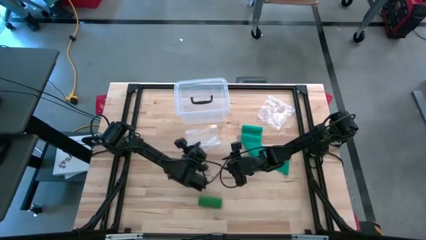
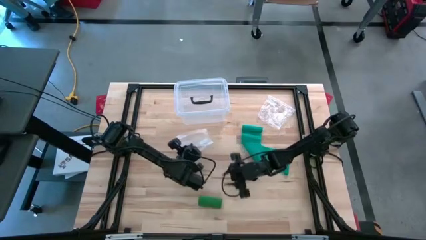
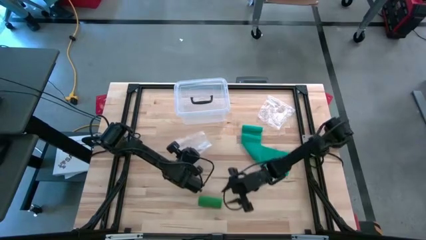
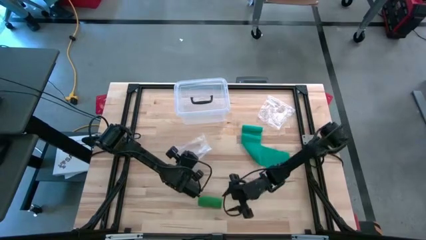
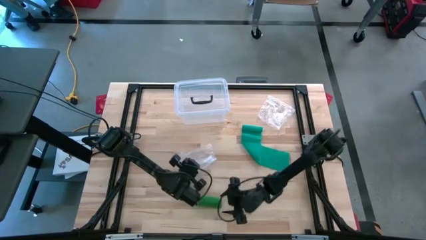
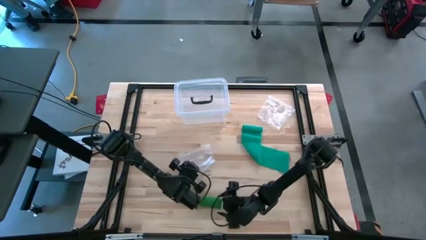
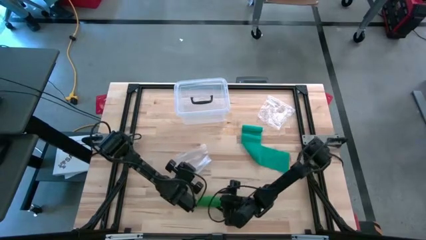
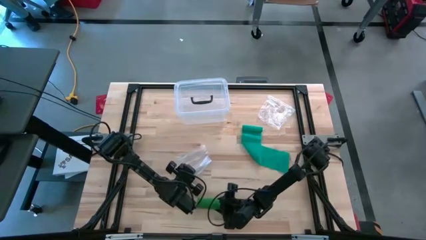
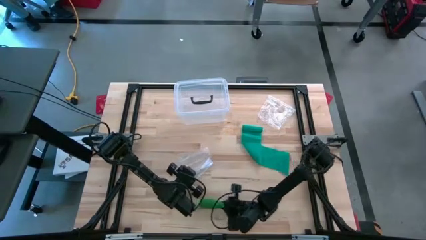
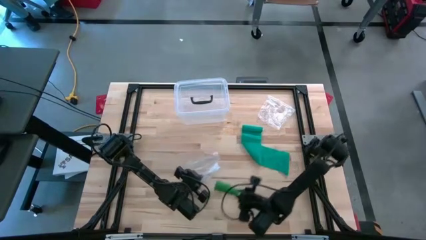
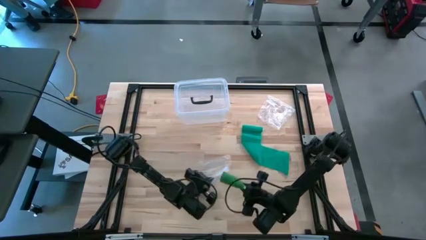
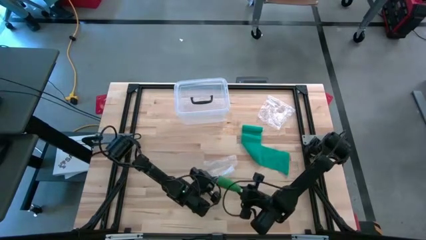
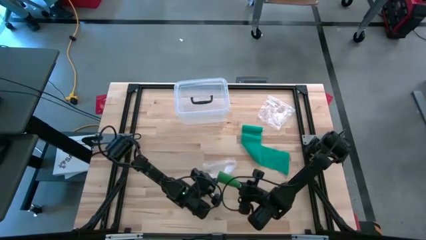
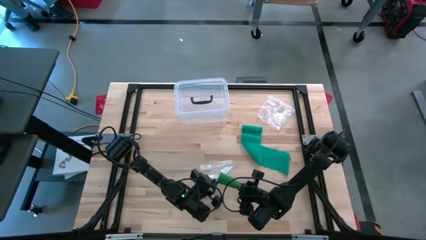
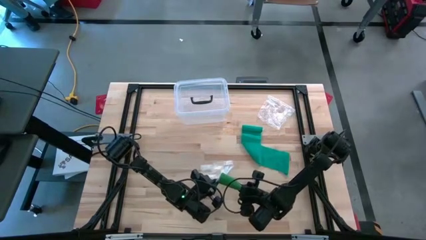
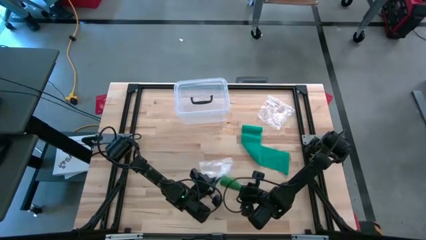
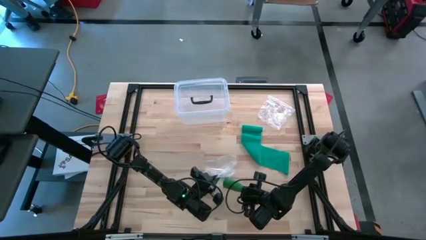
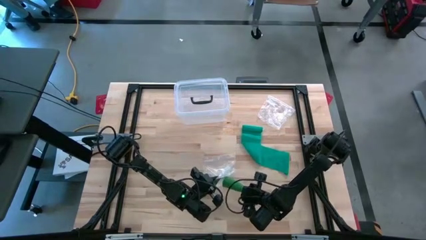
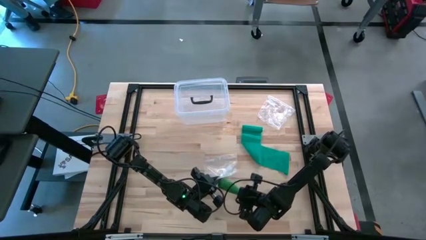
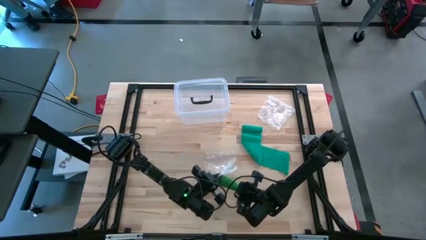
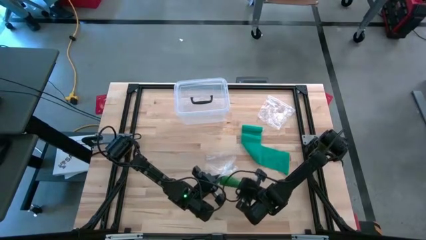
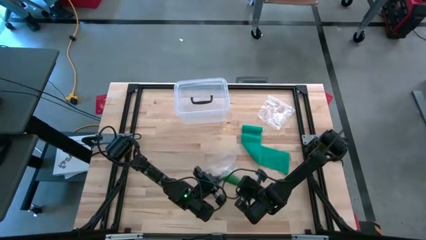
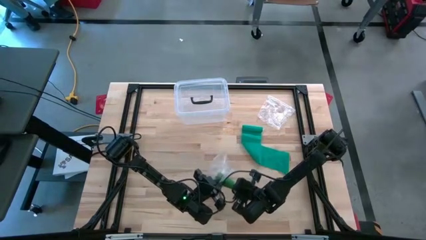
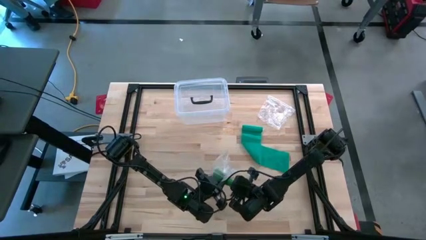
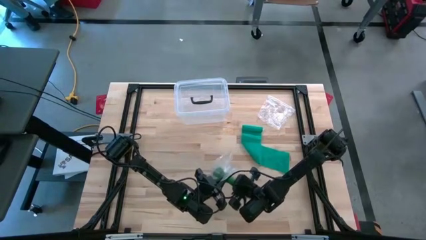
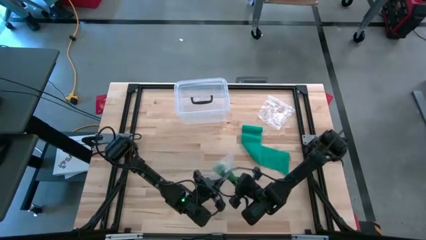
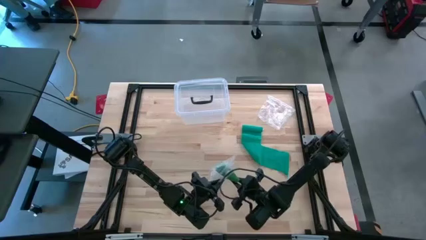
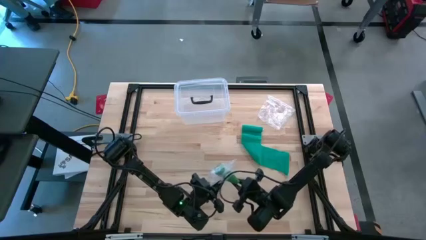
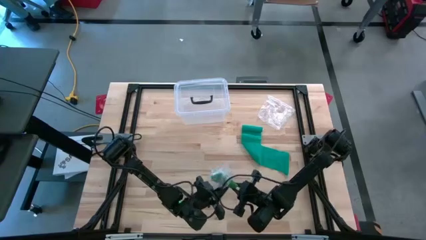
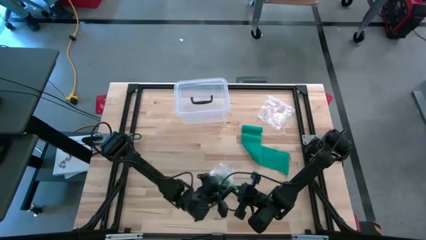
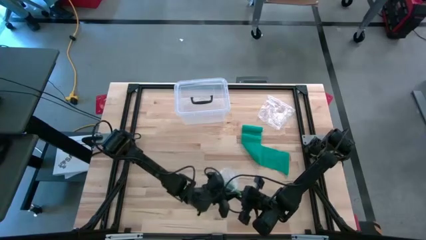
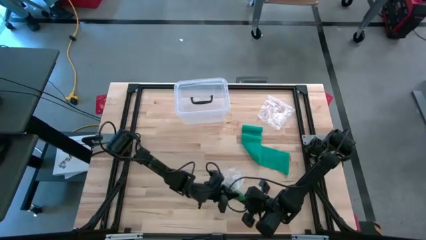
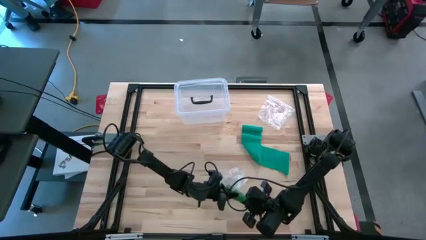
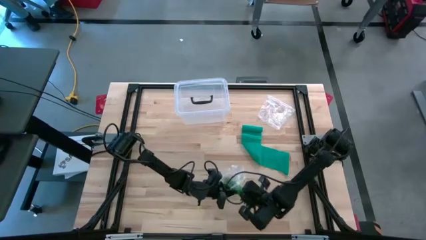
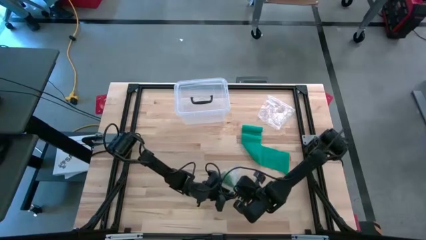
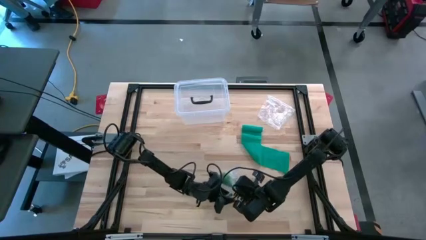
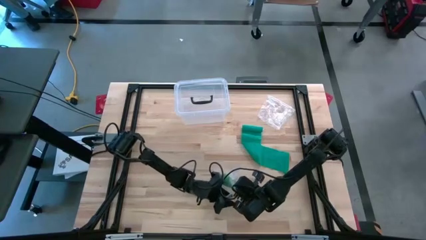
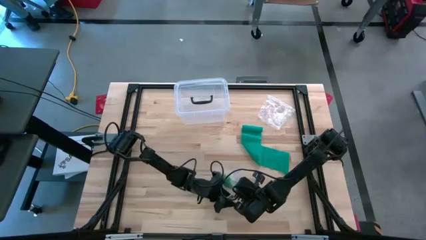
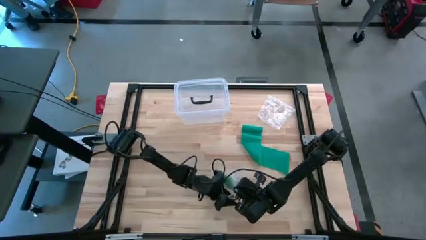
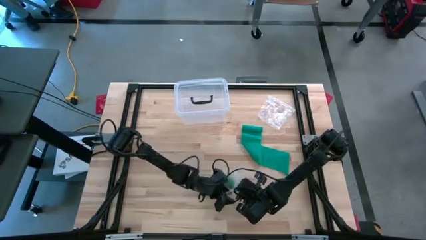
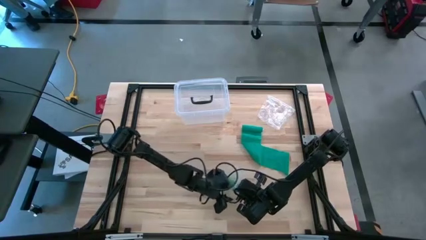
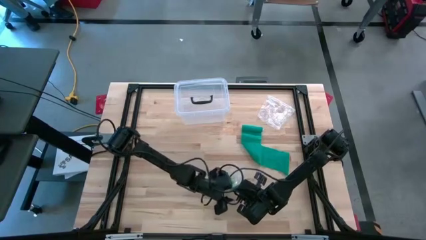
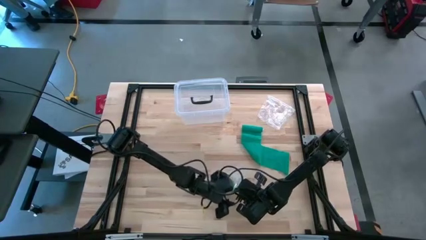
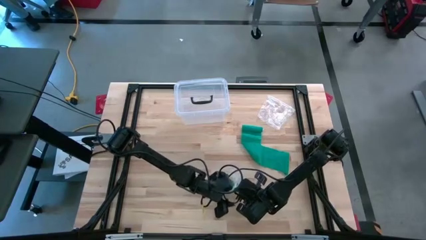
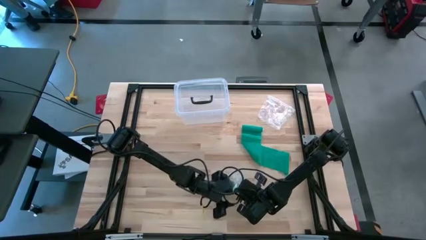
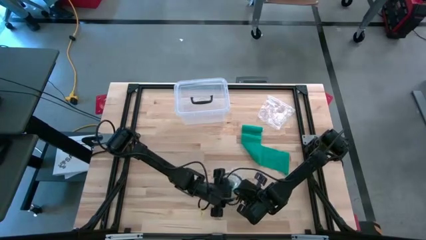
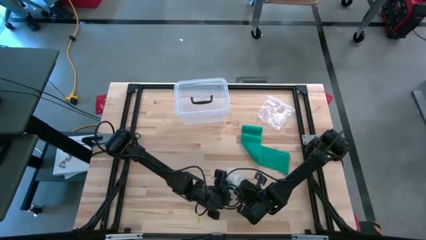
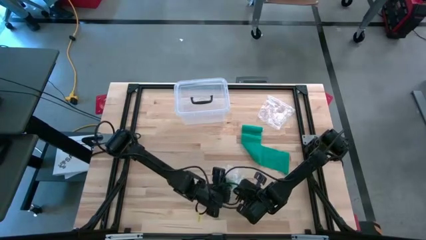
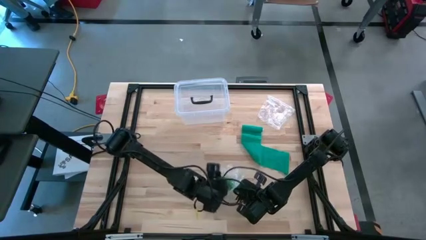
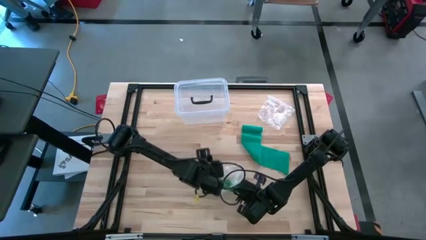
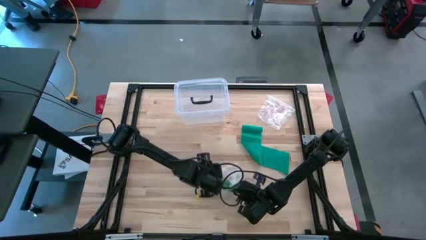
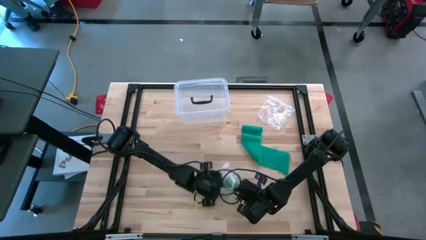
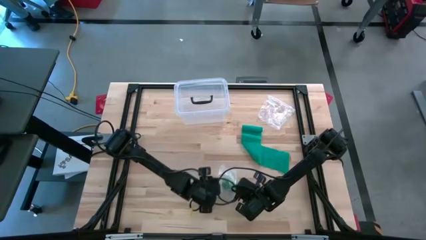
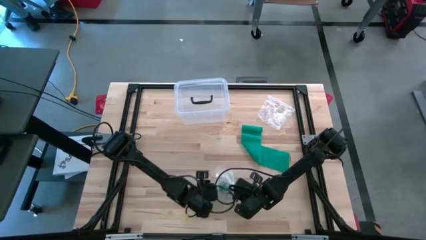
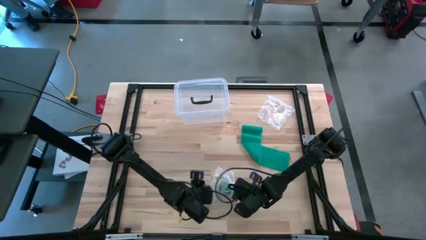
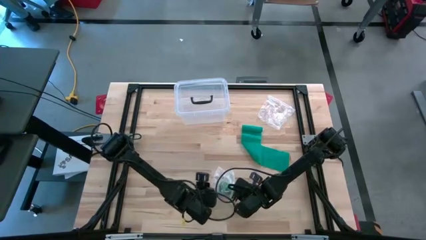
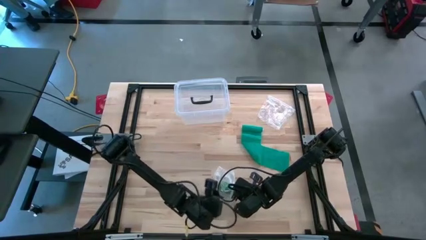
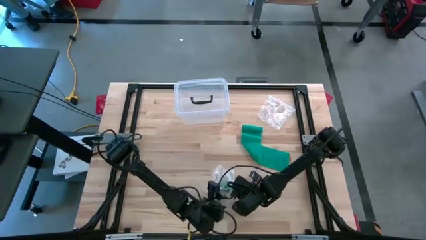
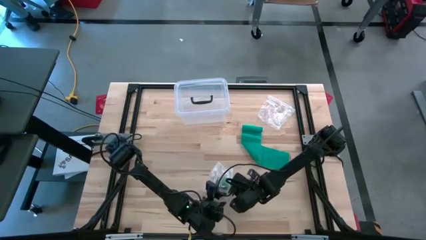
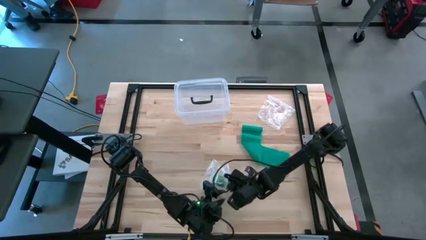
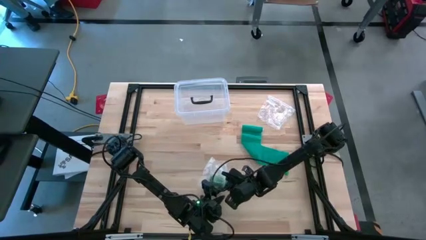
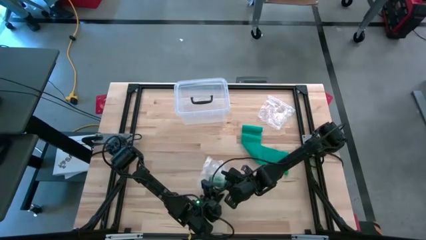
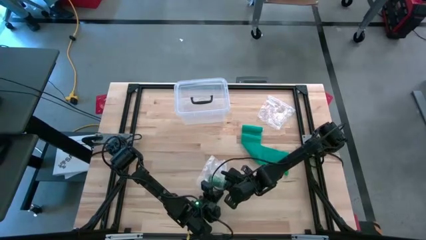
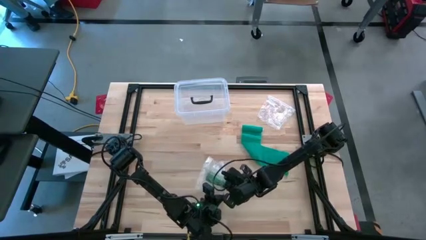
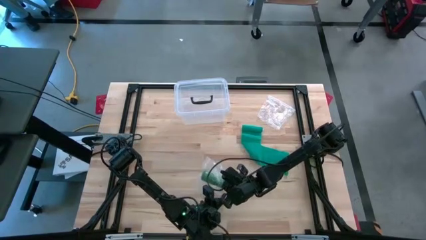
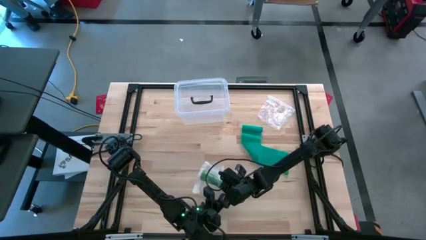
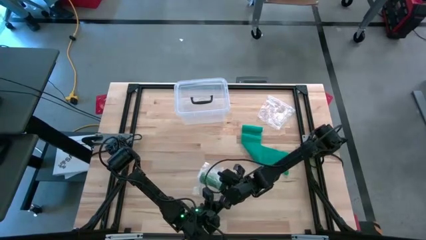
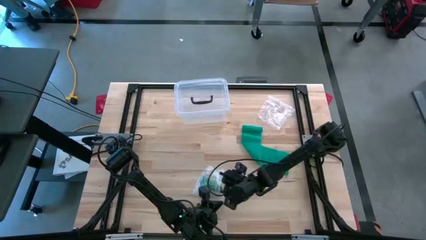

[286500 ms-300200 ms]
Task: Roll bandage
Put the green bandage into the zip bag

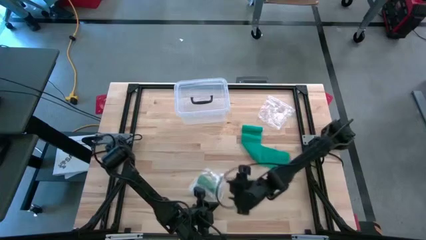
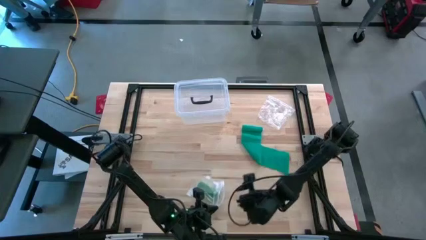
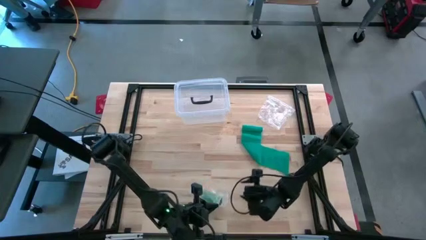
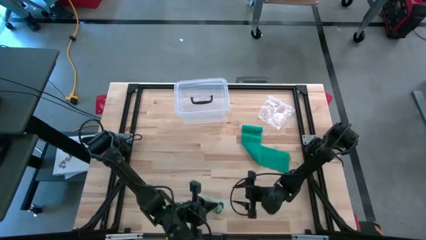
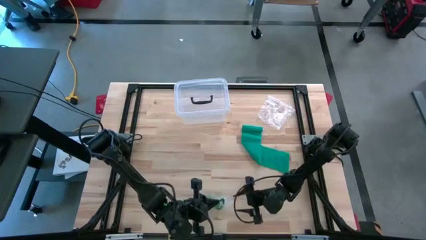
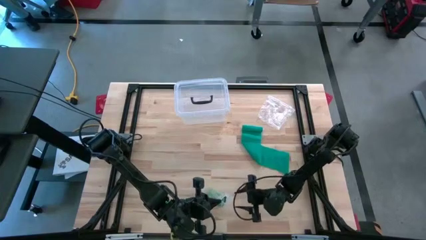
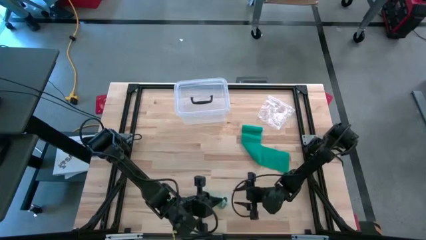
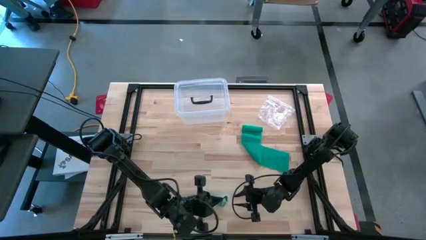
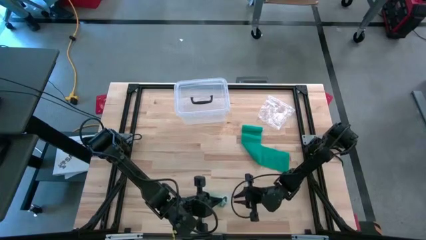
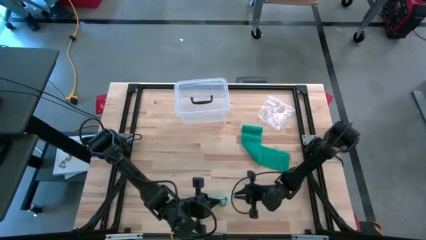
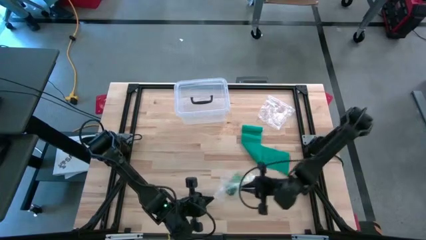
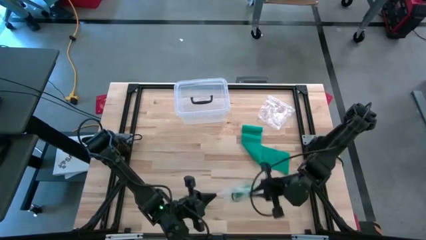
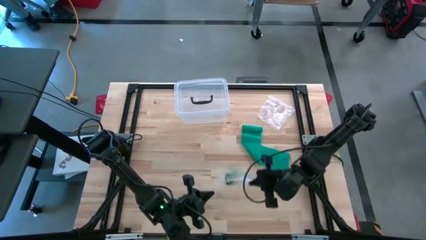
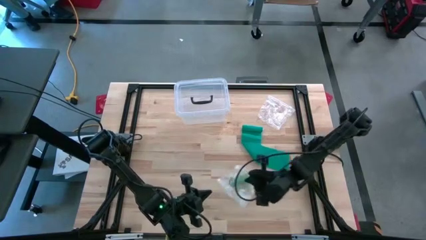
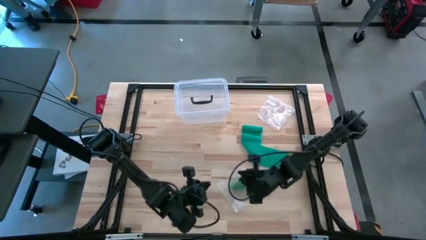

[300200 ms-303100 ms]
Close the zip bag
